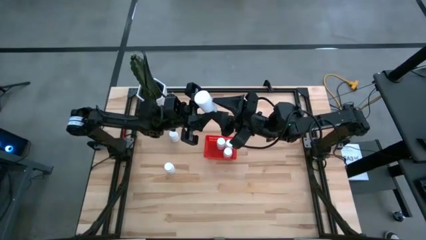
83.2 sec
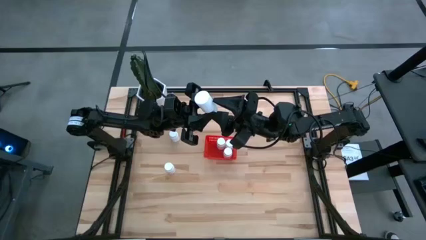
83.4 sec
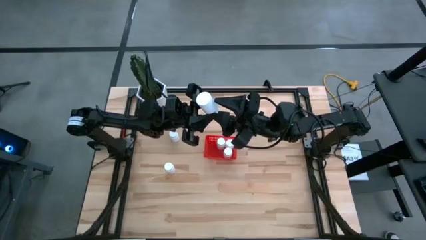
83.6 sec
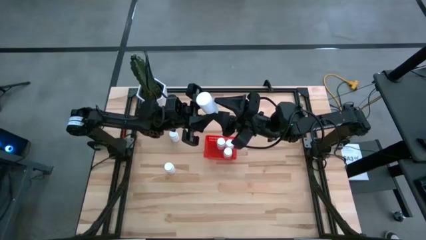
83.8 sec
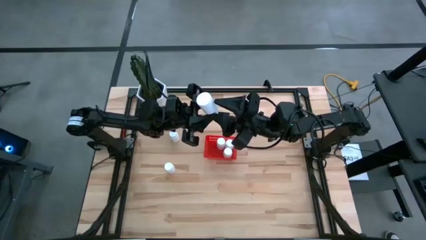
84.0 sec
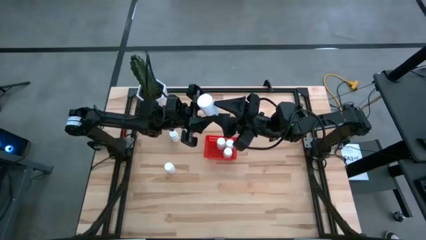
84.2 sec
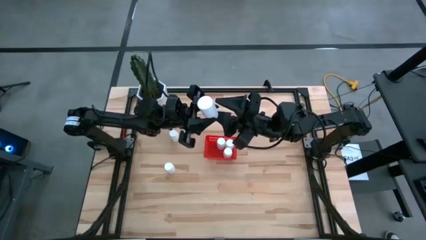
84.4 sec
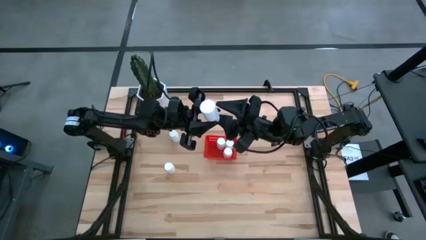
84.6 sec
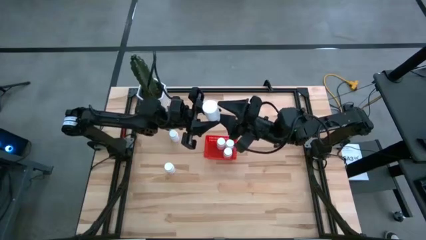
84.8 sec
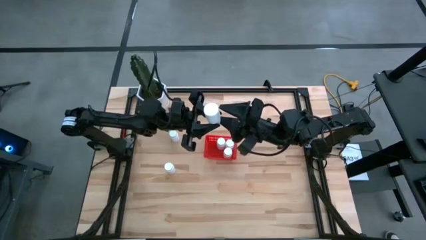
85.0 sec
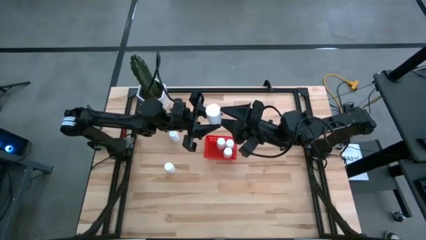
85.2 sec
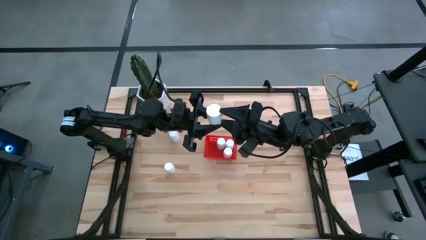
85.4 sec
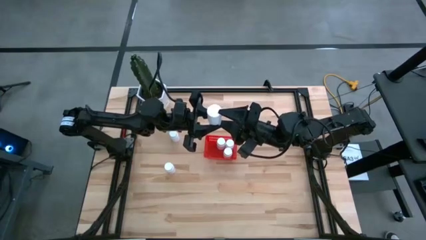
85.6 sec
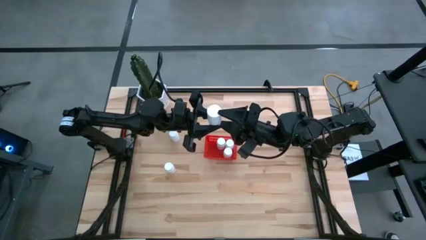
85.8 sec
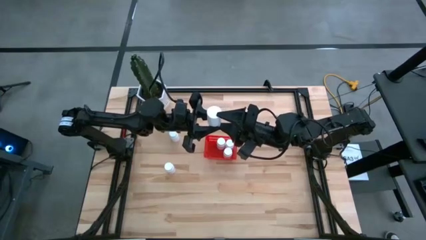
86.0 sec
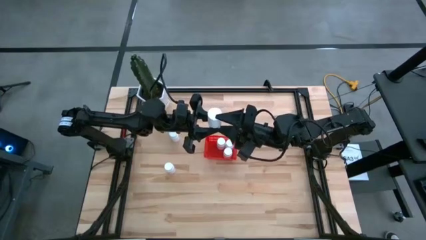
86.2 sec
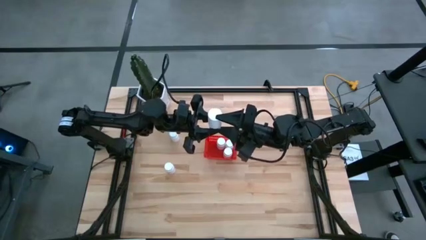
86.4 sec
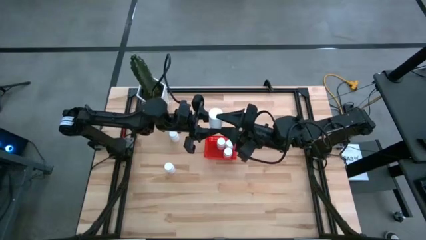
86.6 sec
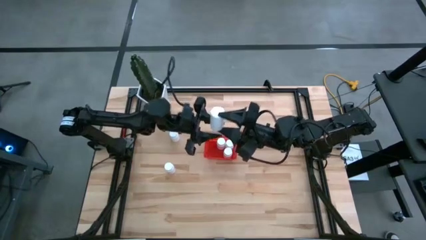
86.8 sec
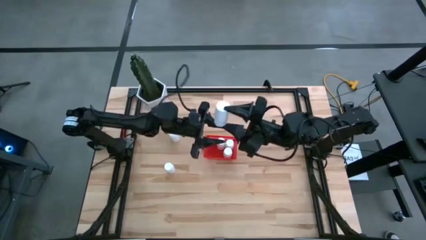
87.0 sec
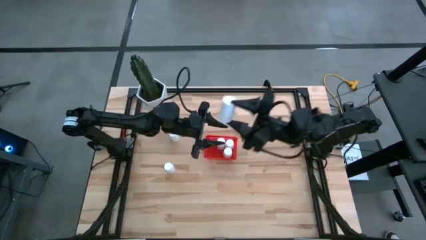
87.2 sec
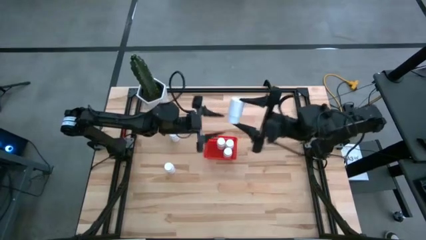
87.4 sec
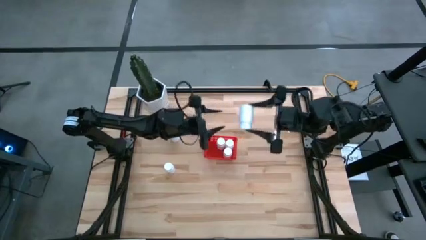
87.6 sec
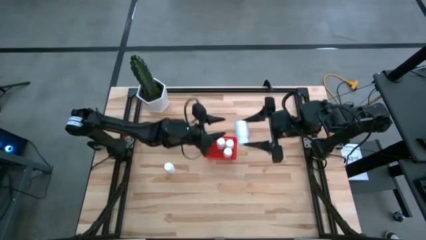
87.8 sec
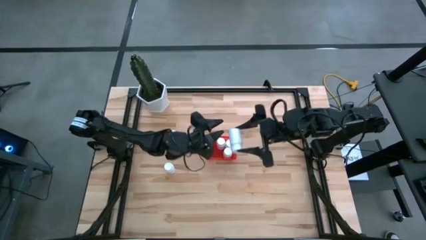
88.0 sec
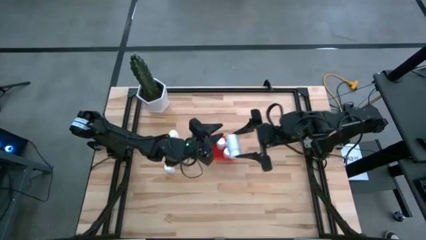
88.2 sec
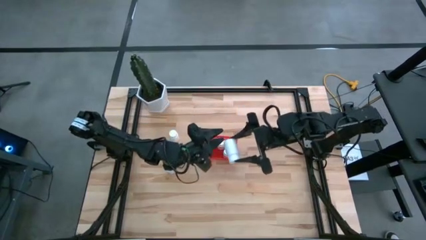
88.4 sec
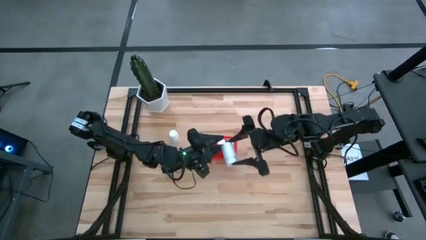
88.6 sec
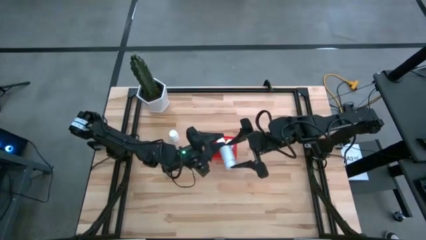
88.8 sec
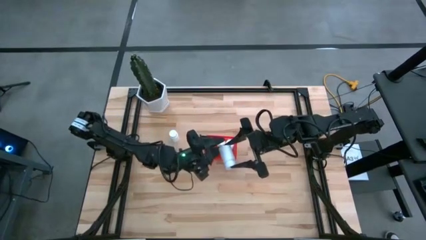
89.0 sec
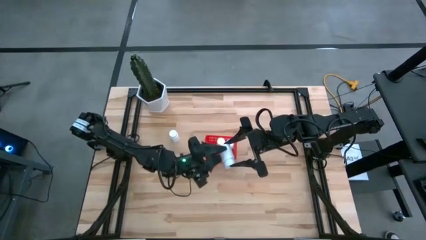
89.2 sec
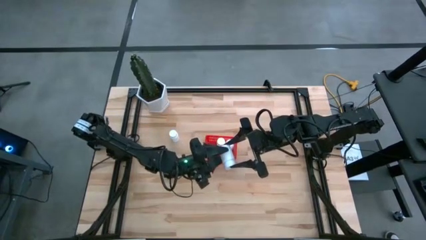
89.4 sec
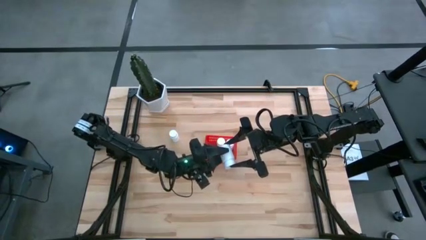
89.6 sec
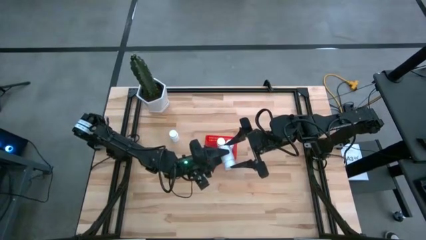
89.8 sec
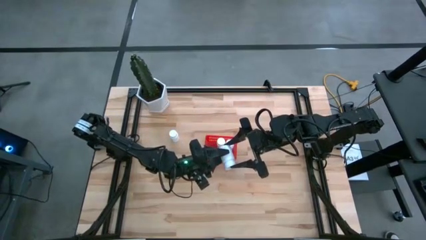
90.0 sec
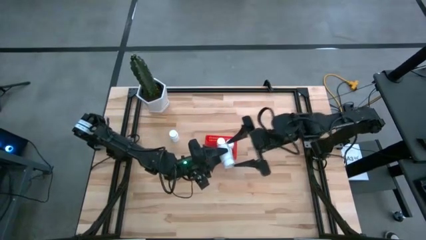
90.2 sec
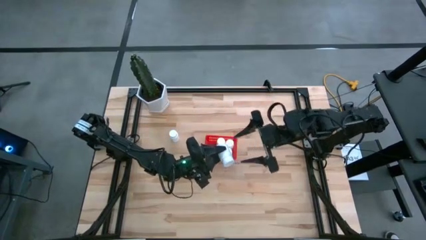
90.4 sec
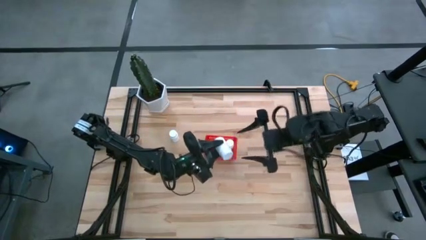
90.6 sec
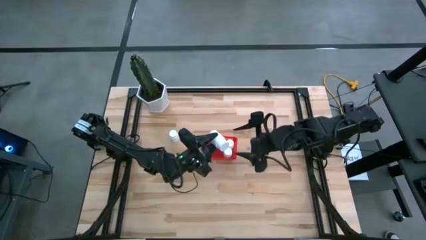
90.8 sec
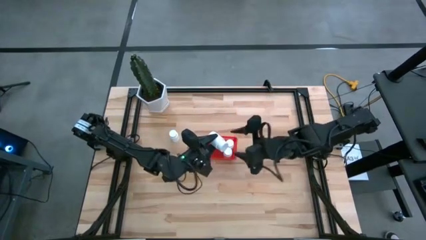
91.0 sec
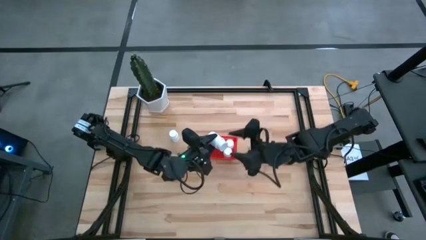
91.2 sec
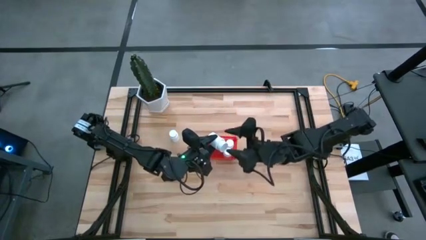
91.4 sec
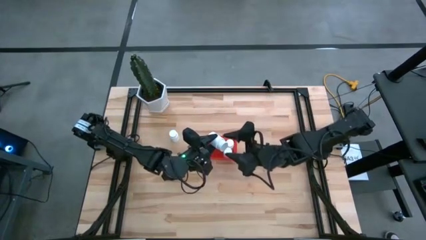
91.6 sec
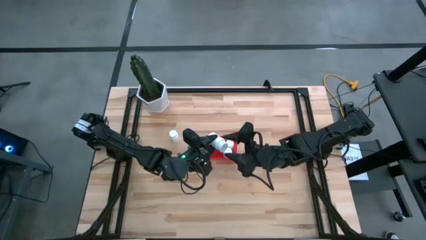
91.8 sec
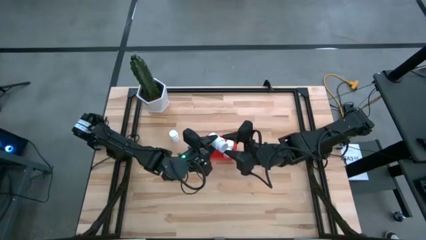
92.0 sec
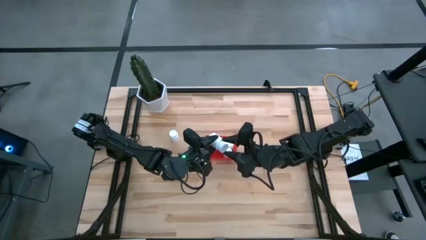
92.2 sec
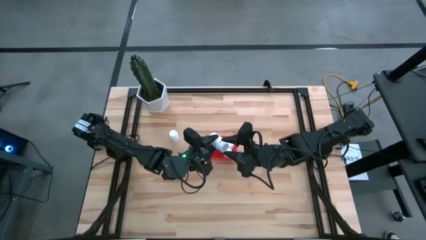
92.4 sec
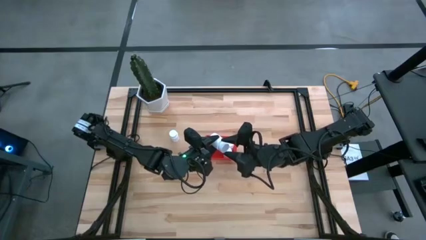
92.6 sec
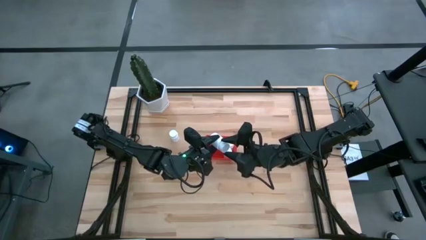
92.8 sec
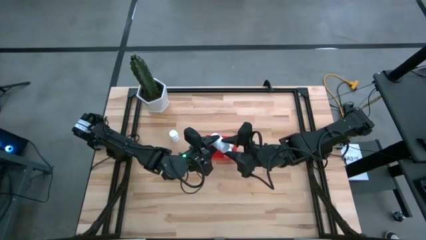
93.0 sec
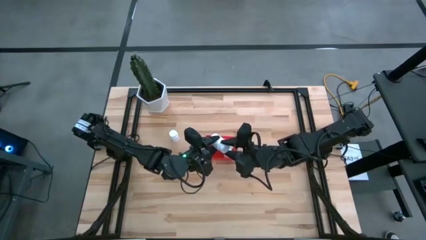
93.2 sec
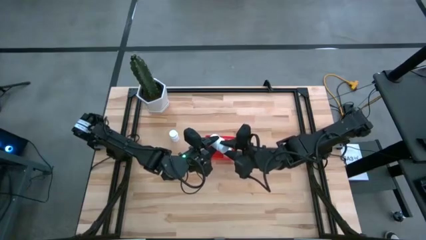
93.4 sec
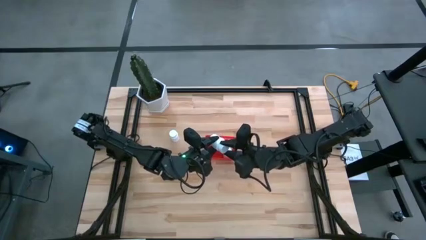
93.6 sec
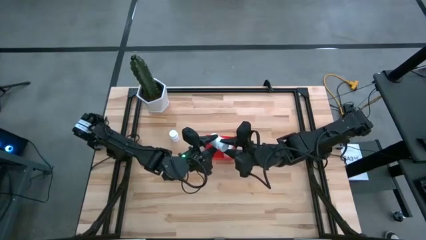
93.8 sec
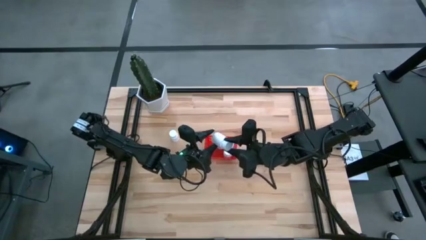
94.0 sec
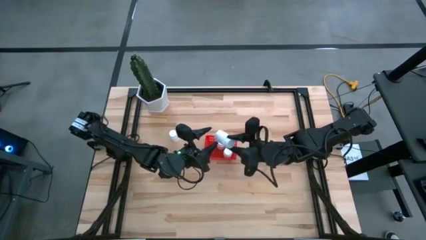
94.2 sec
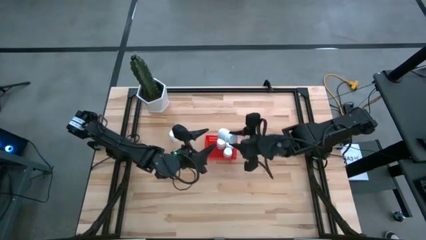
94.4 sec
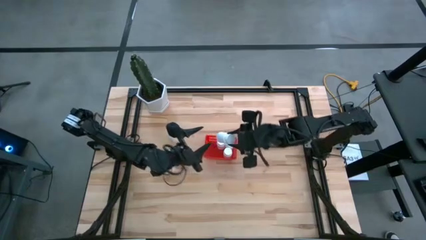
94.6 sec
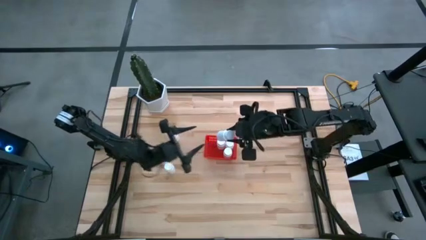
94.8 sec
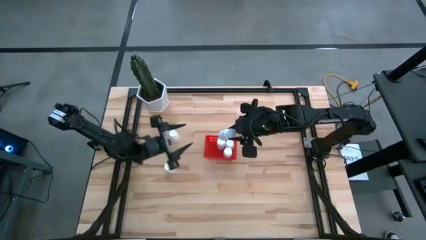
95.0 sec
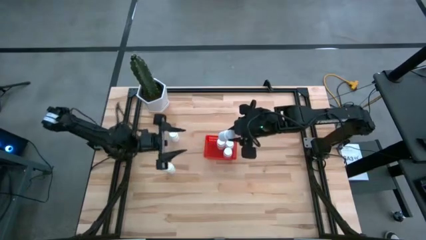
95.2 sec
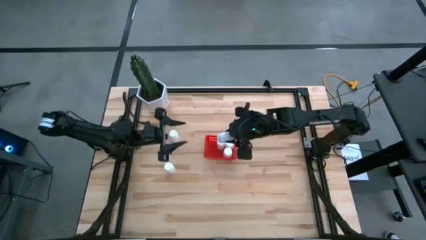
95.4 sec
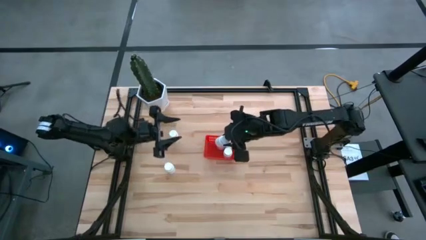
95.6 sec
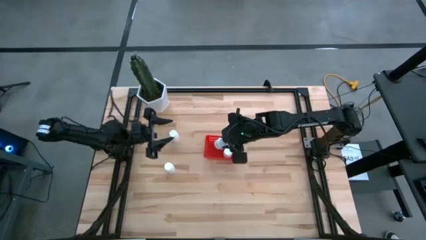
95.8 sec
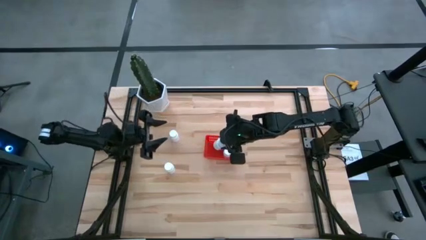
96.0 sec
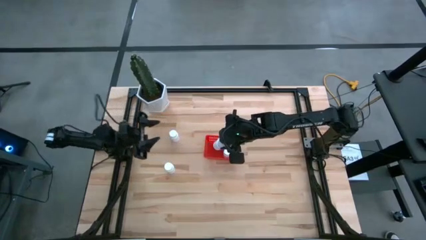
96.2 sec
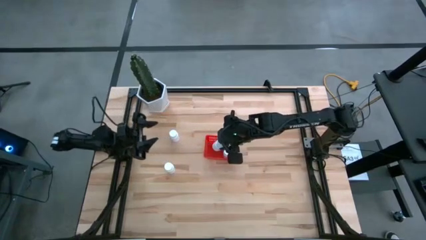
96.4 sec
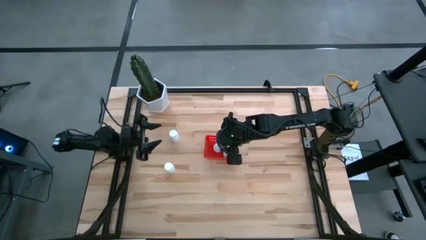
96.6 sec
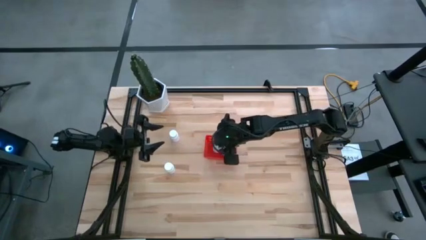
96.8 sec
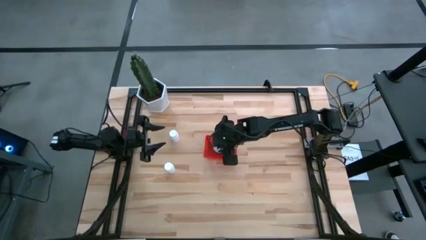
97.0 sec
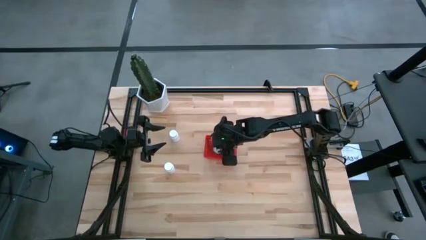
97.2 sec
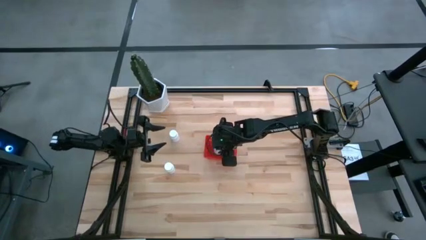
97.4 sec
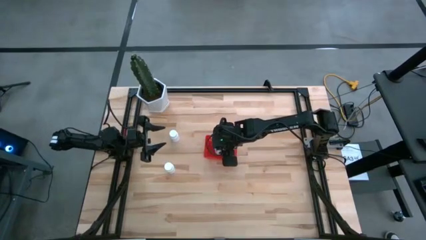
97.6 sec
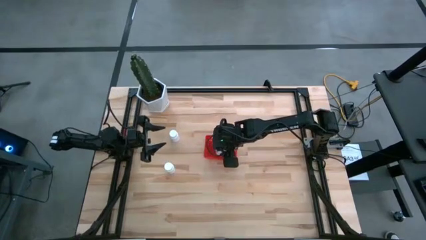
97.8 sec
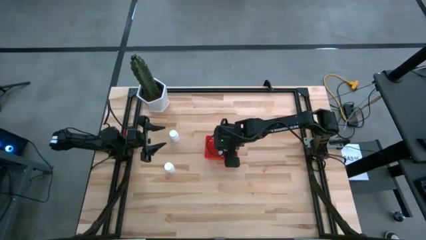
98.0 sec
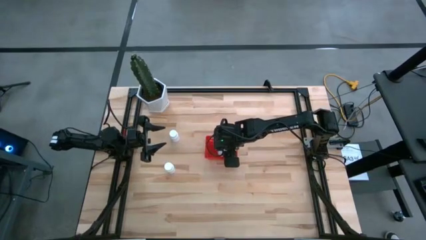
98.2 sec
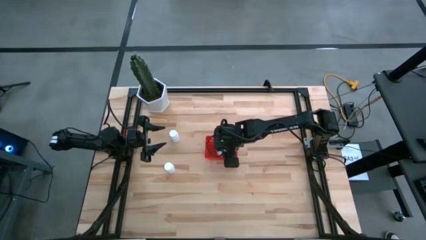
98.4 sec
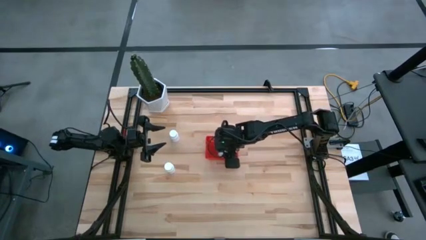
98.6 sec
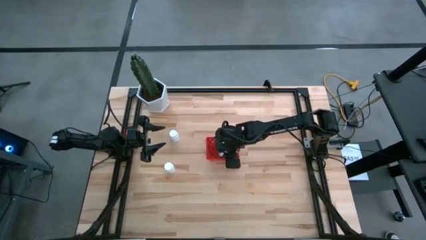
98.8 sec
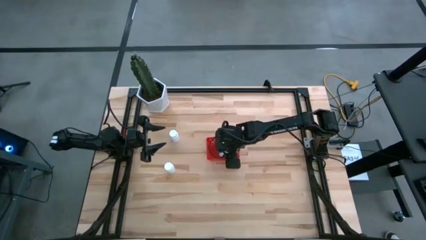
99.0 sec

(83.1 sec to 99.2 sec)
Task: Pick and place pill bottles into a basket
Put the white pill bottle into the red bin
